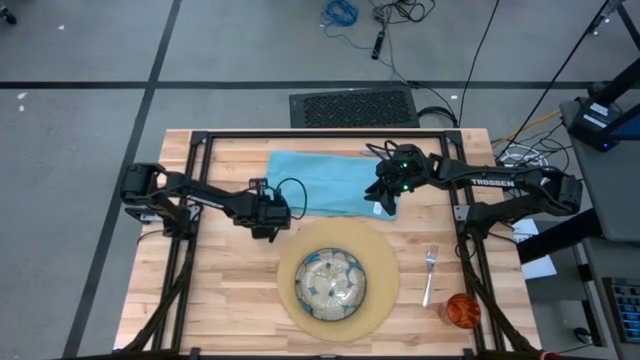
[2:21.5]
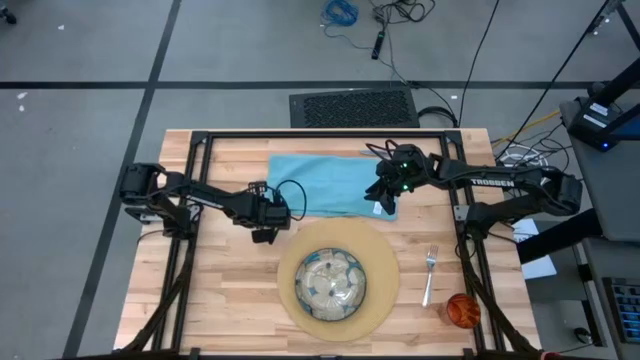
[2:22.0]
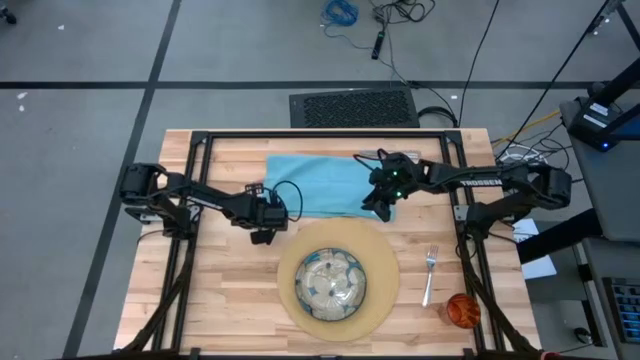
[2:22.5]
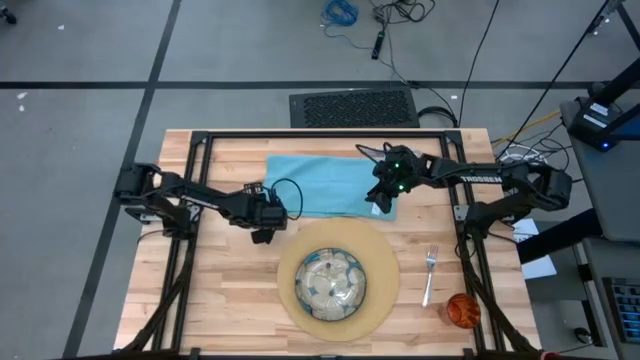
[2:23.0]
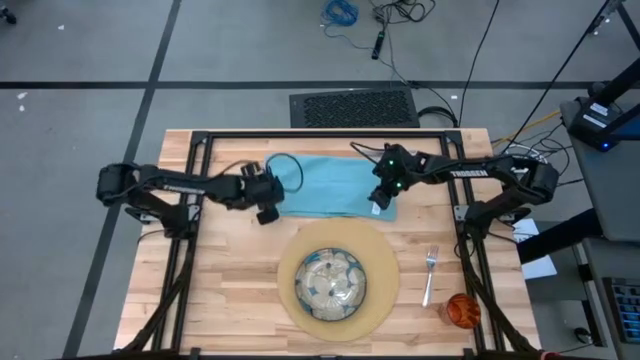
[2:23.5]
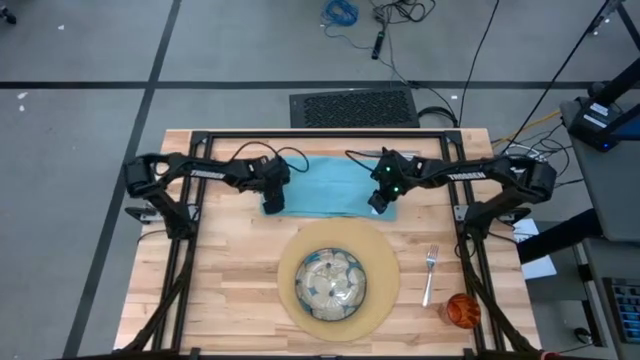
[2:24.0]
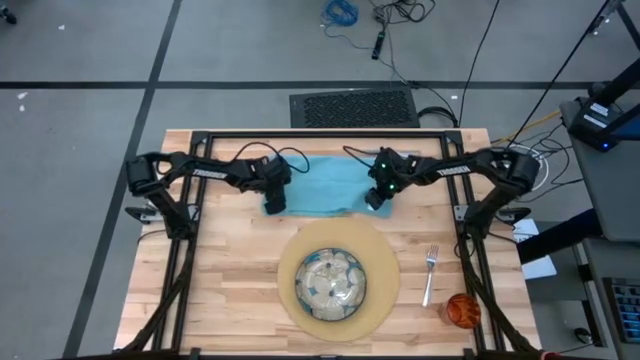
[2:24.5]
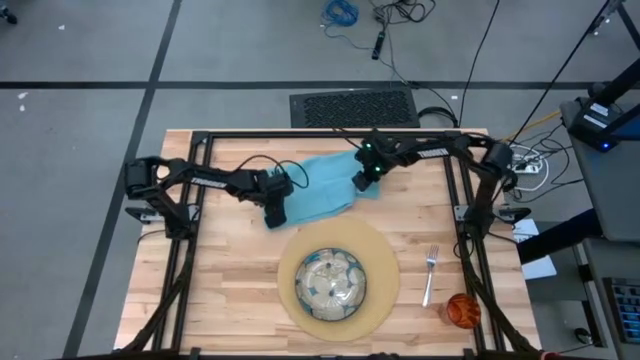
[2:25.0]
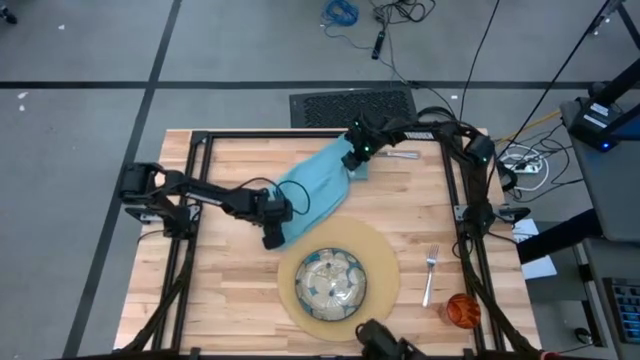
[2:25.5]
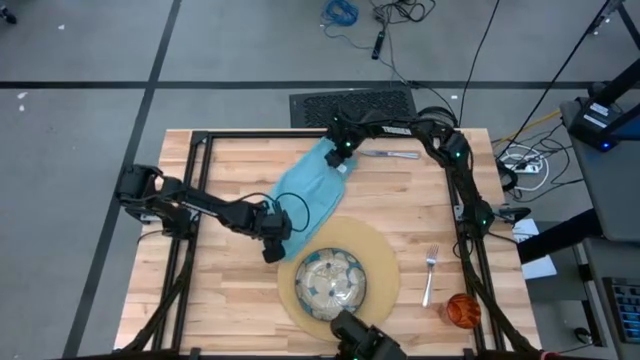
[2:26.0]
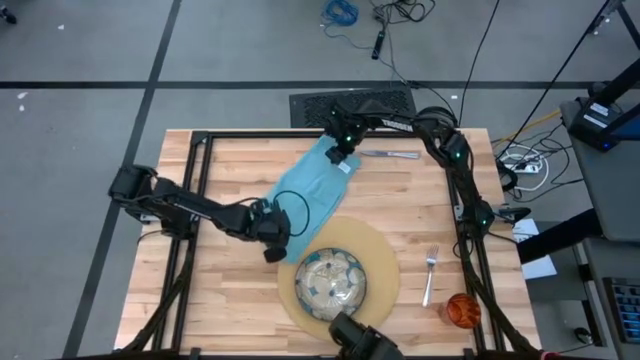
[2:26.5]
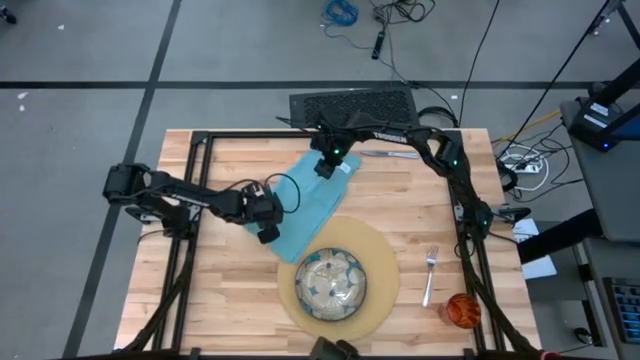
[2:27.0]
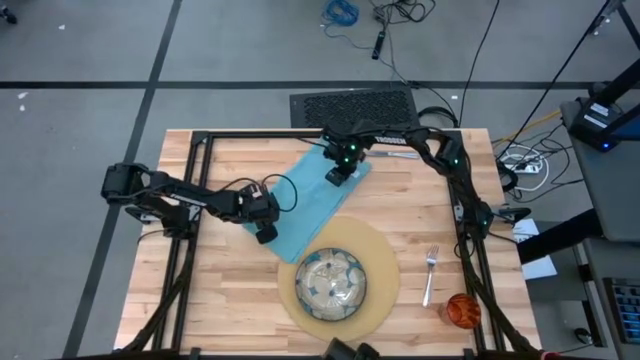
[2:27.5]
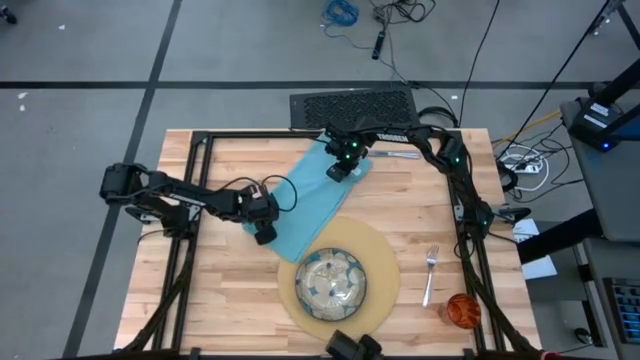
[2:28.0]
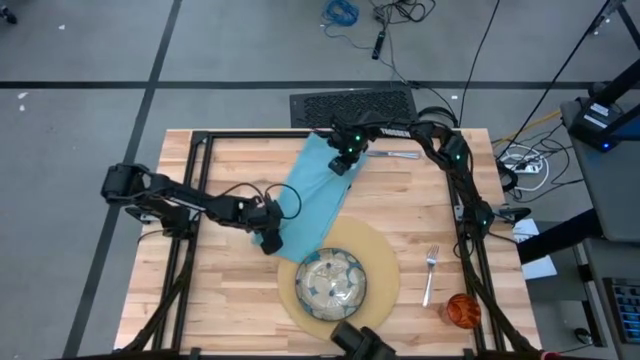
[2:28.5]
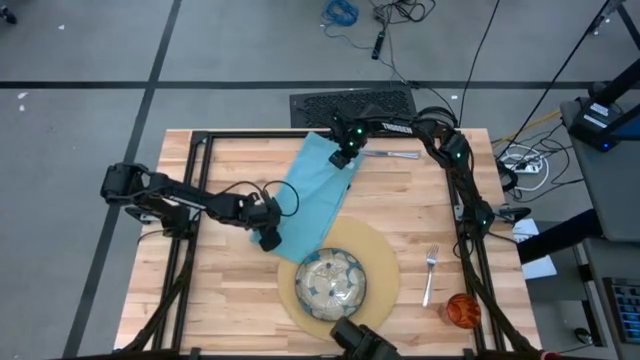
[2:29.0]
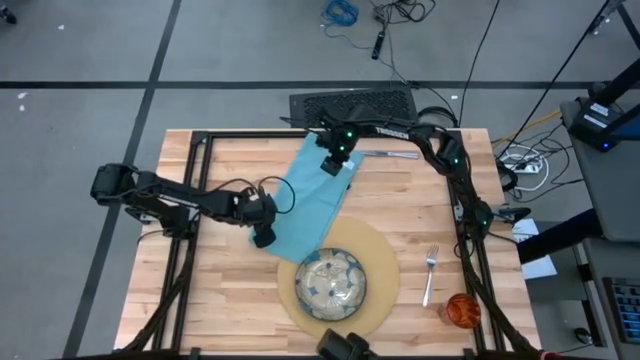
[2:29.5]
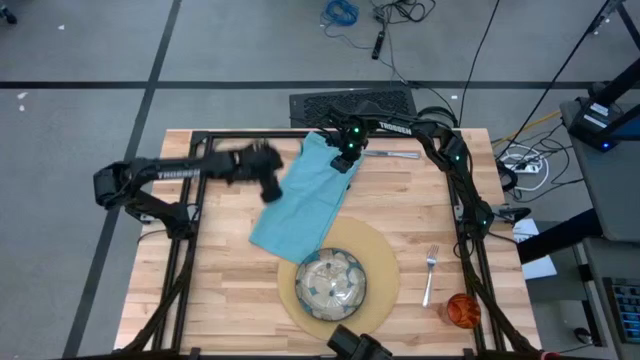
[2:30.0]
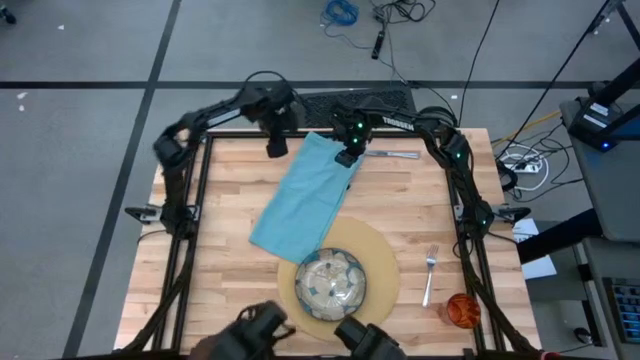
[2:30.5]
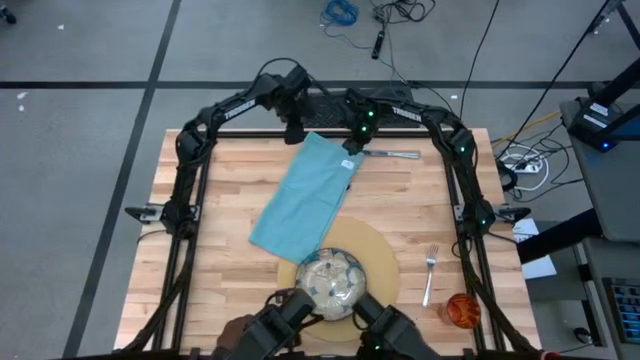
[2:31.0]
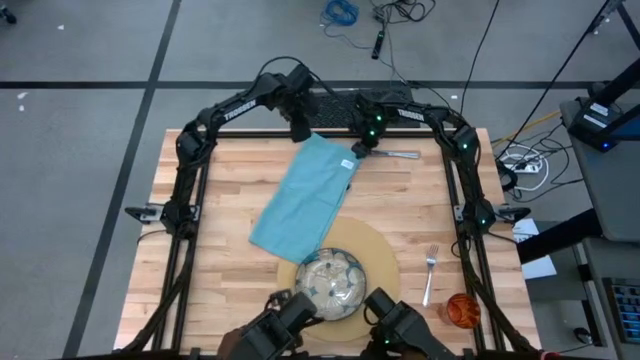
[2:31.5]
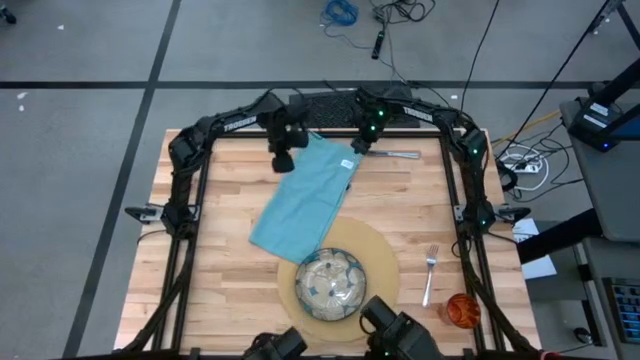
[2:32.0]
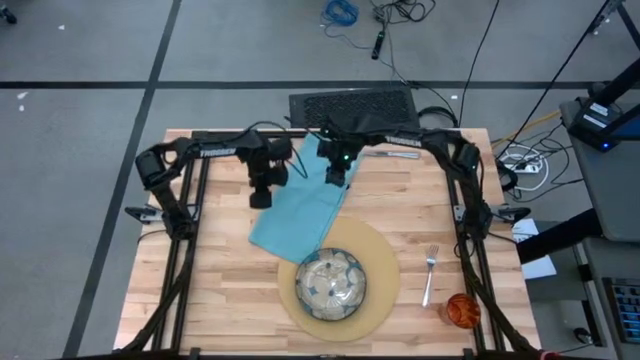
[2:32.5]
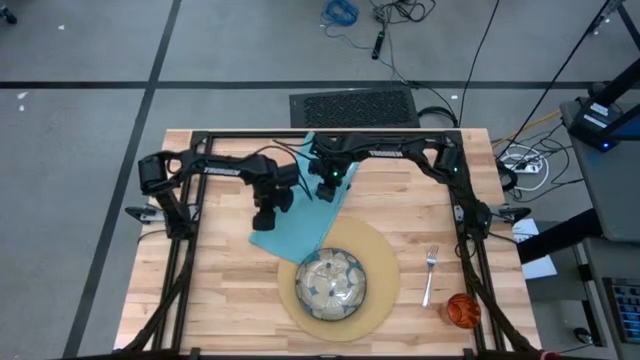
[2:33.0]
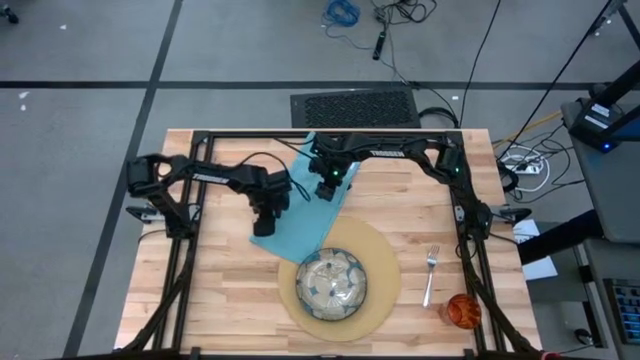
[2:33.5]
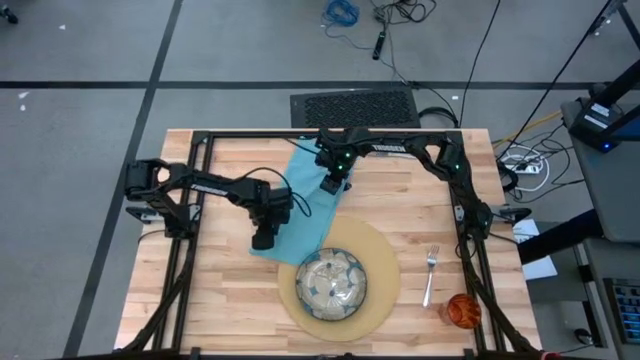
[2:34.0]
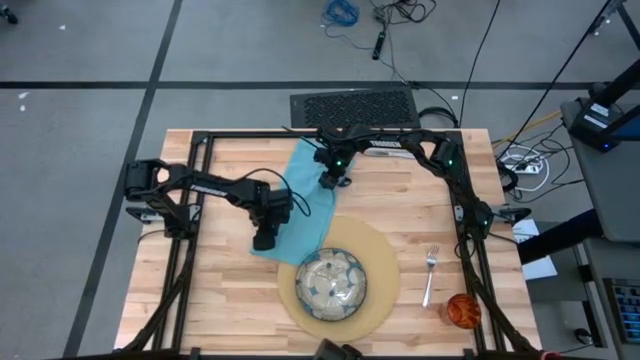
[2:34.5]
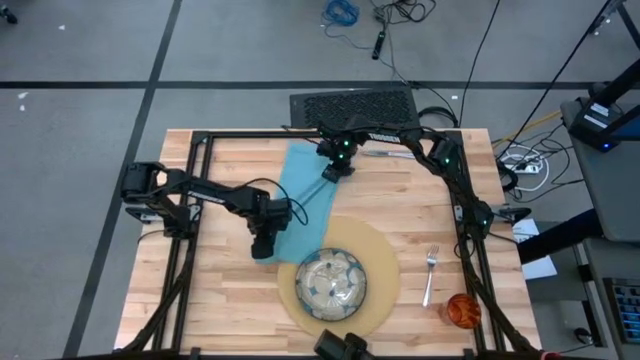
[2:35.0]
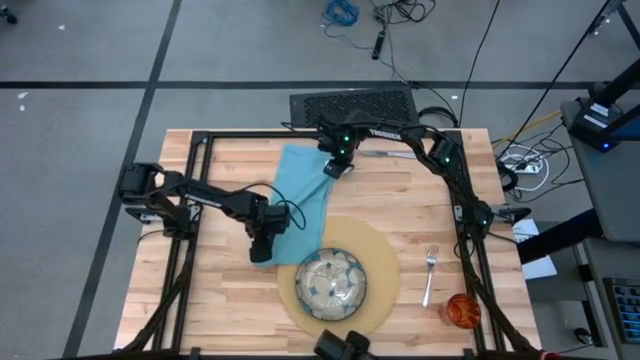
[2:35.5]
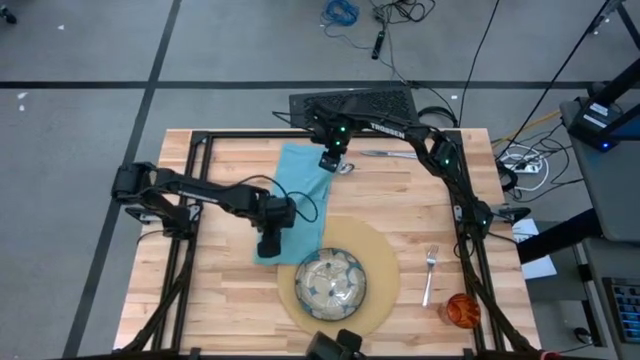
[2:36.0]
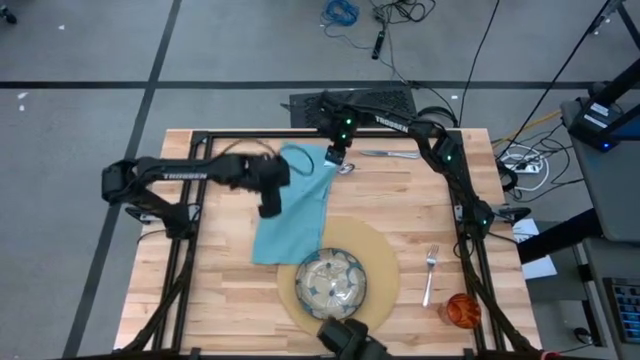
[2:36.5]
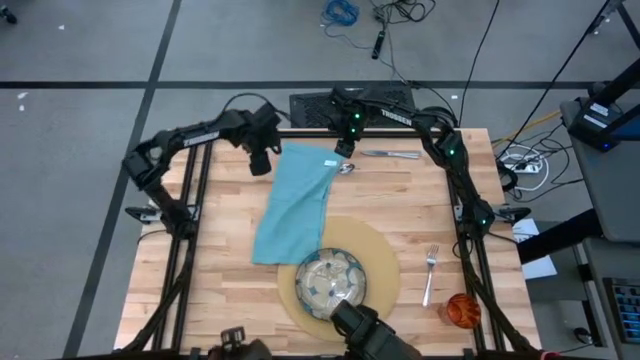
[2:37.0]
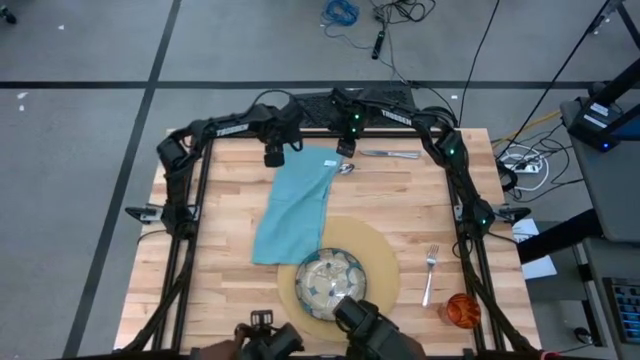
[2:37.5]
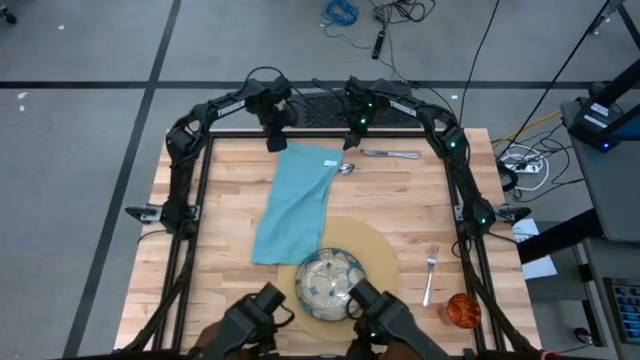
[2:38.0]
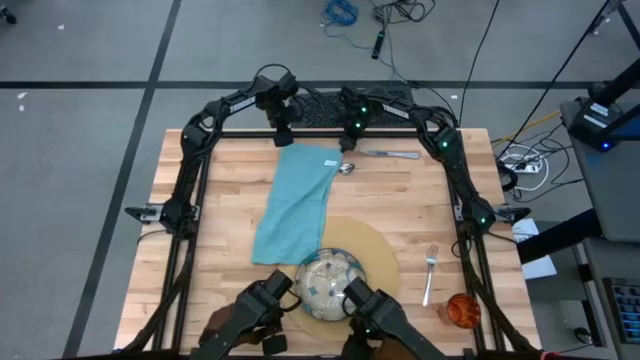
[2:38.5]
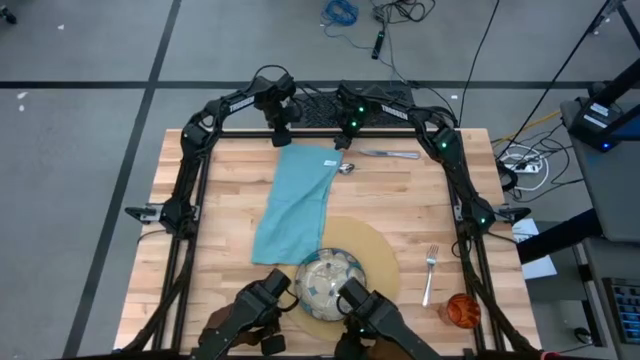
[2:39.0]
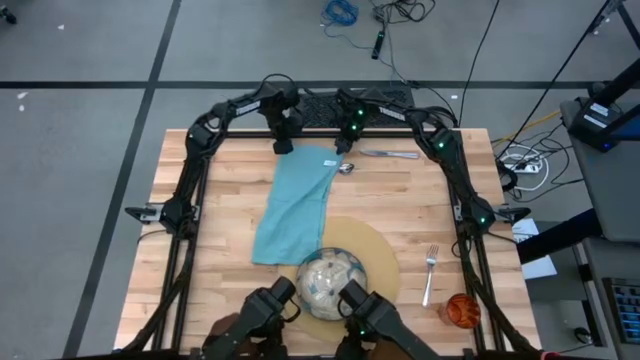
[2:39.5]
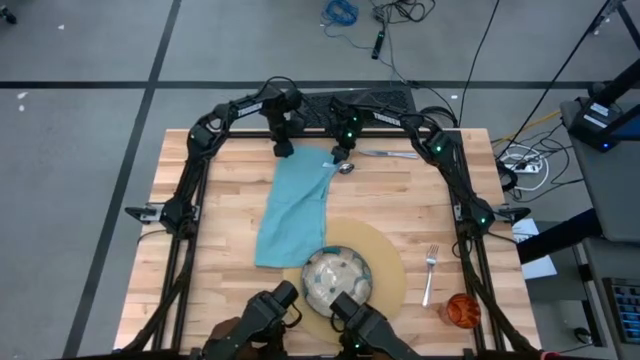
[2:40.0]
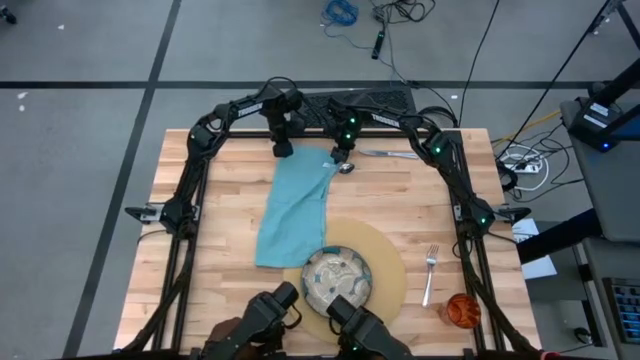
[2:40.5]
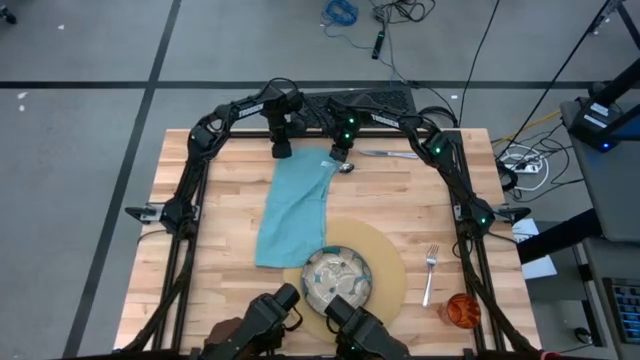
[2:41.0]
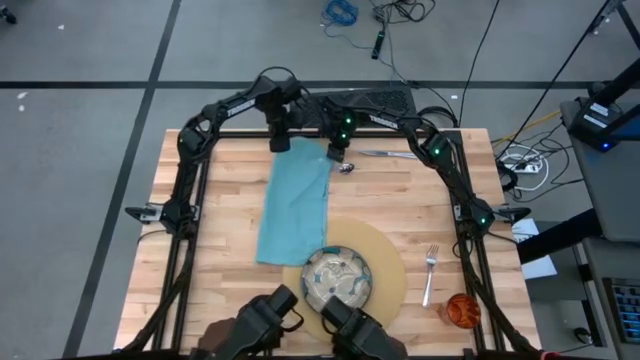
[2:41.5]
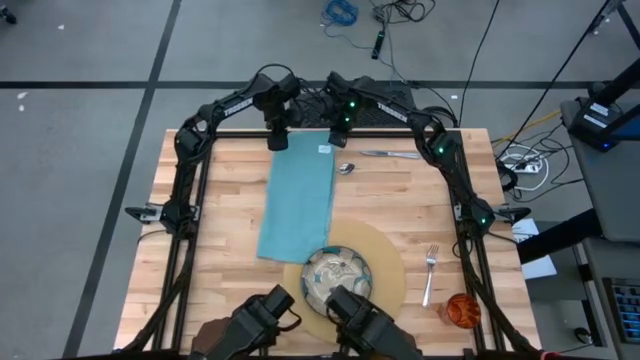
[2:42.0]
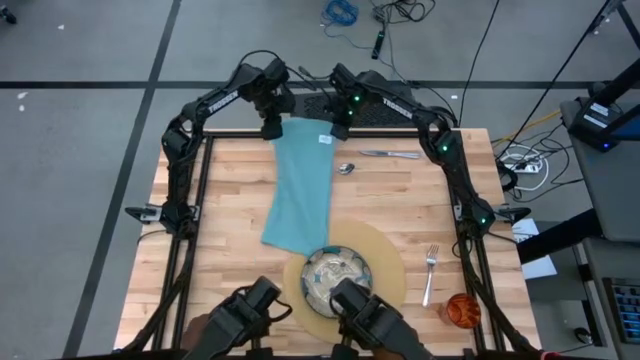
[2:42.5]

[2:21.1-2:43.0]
Task: Set table place
Fold the blue napkin
